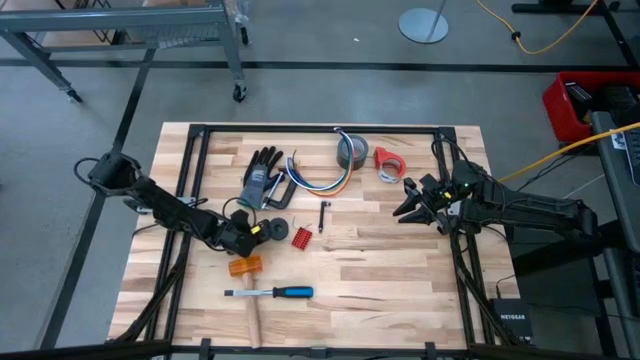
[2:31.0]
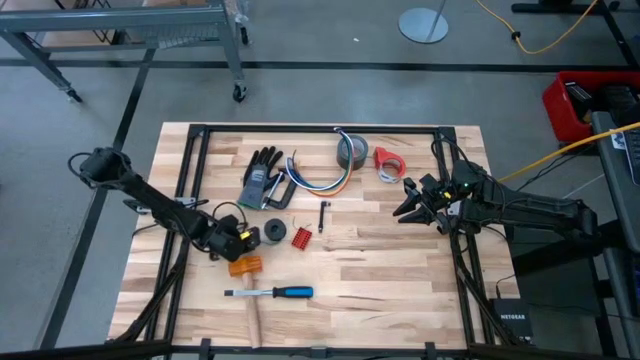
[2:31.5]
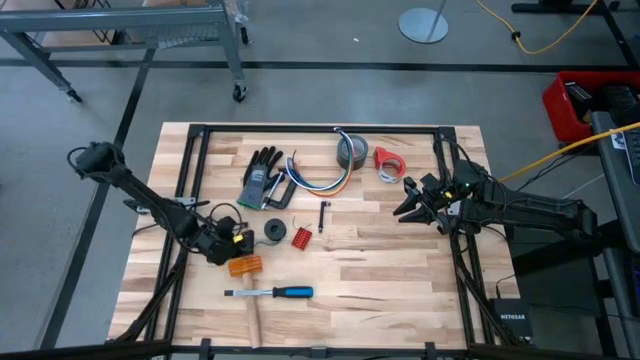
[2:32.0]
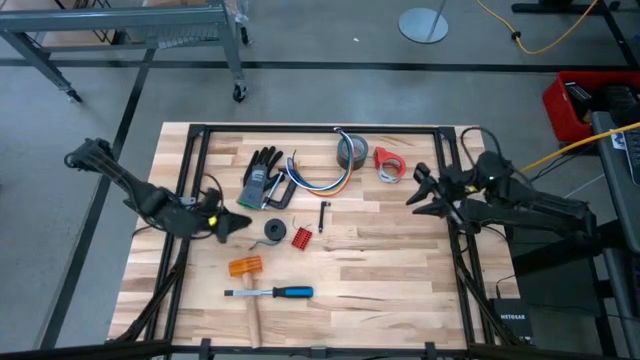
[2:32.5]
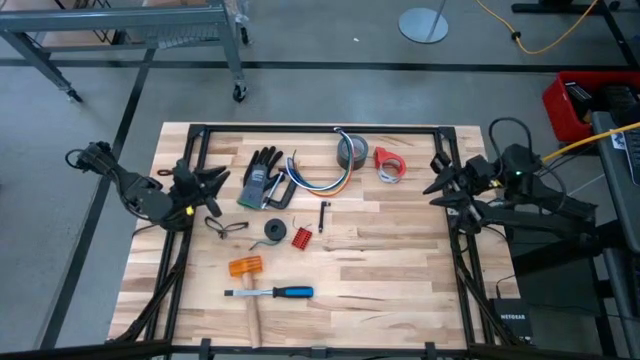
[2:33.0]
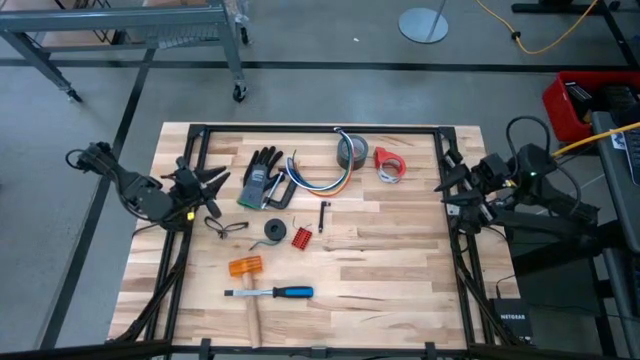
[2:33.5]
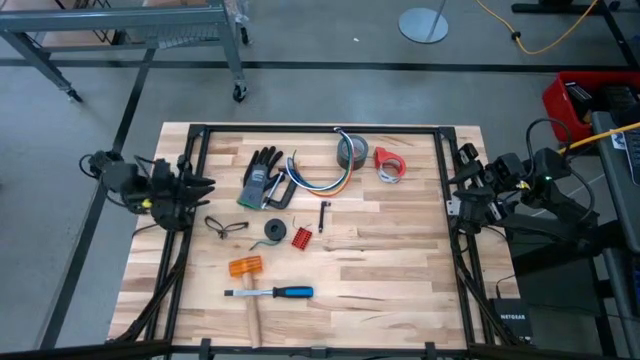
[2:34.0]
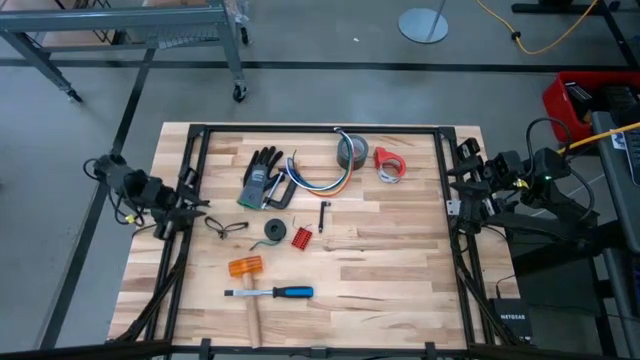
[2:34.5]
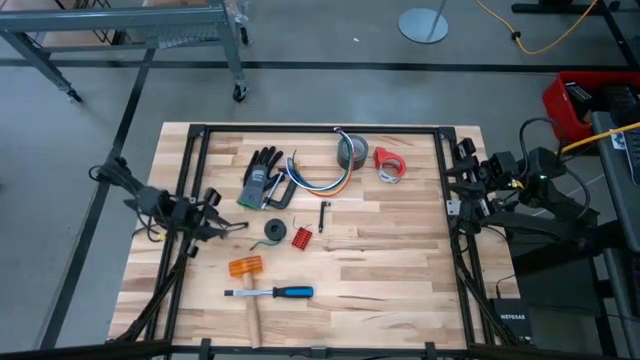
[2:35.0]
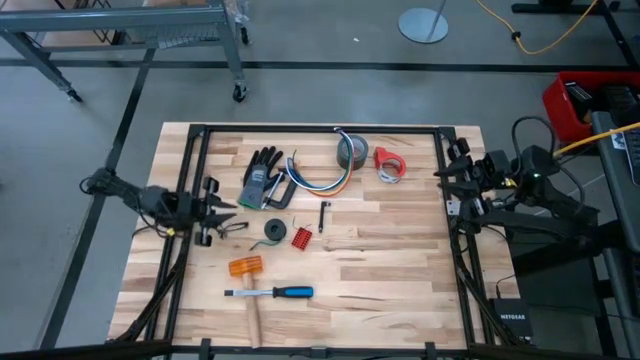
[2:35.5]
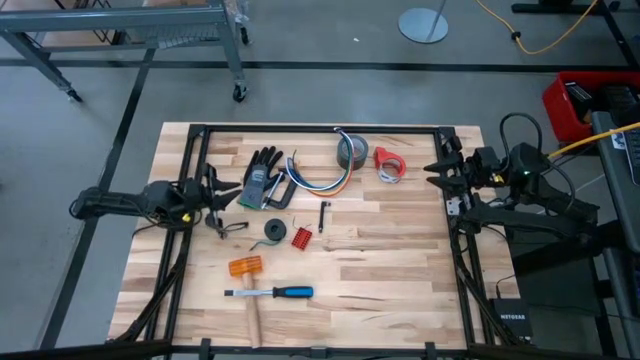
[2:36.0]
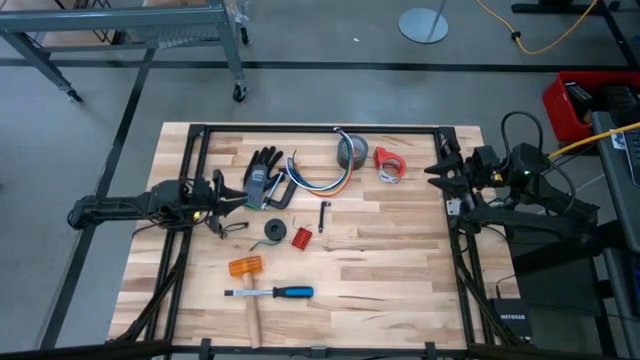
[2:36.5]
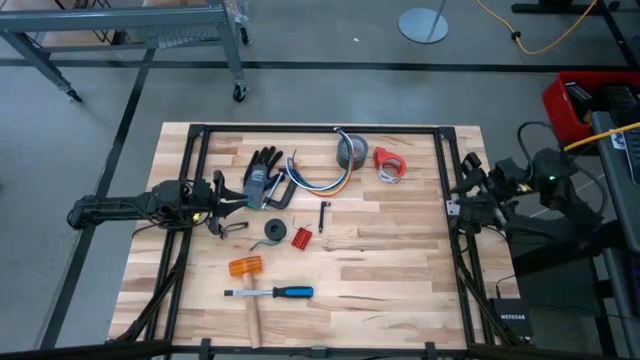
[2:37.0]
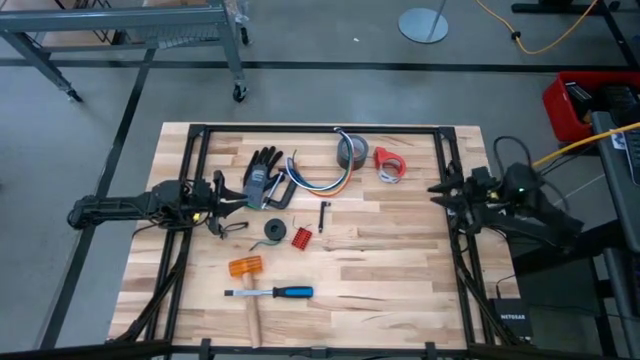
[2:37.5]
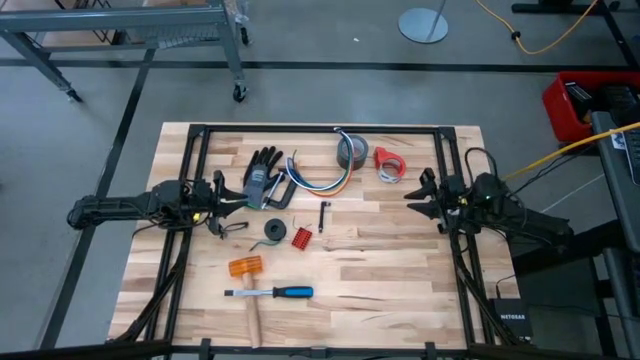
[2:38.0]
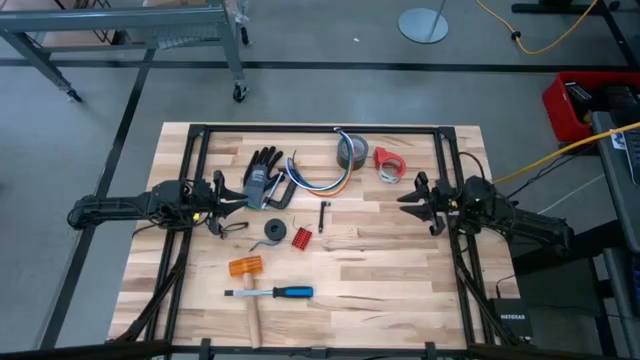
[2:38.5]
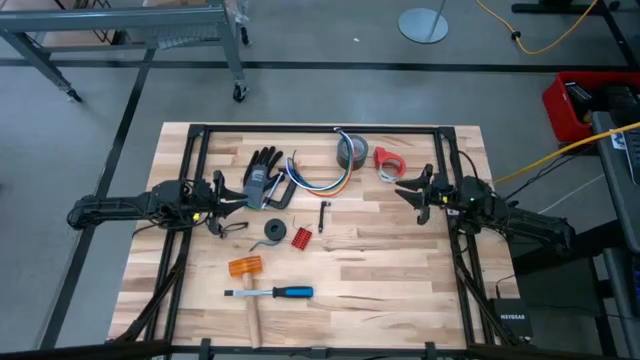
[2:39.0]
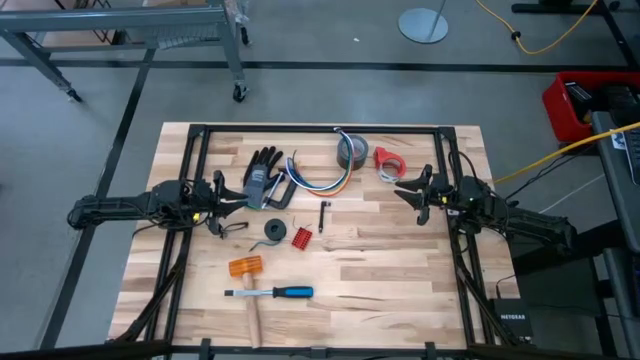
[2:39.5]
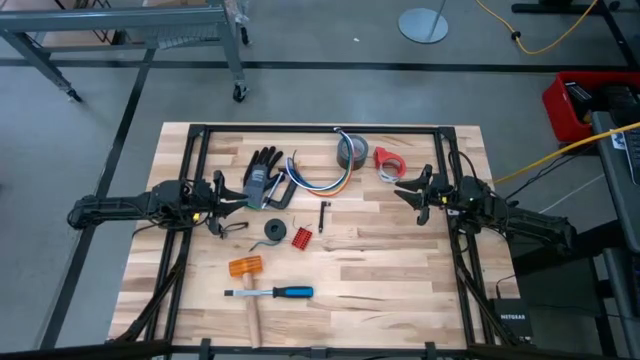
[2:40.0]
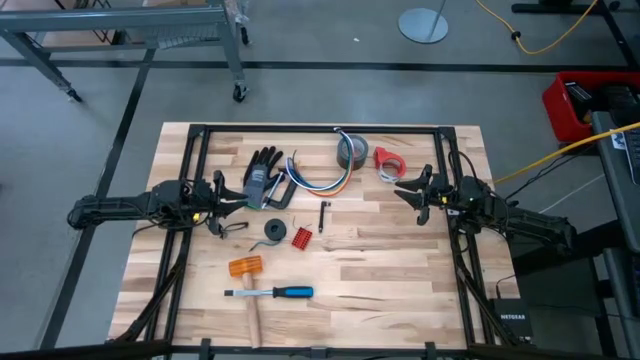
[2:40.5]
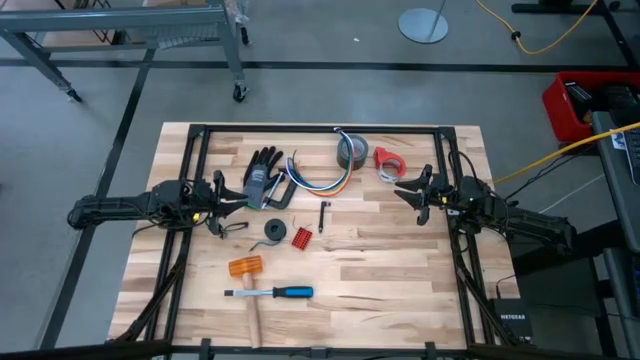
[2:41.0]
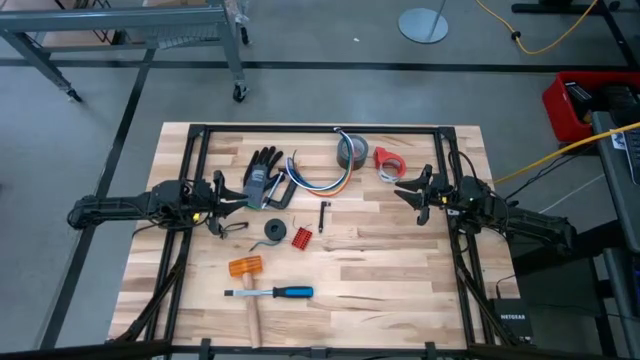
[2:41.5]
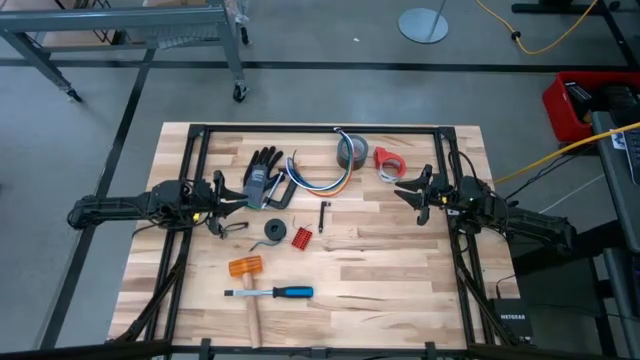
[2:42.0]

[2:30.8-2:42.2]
Task: Coil cords
Return to Home Position

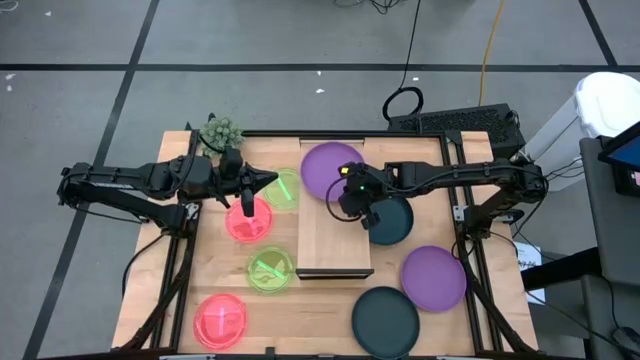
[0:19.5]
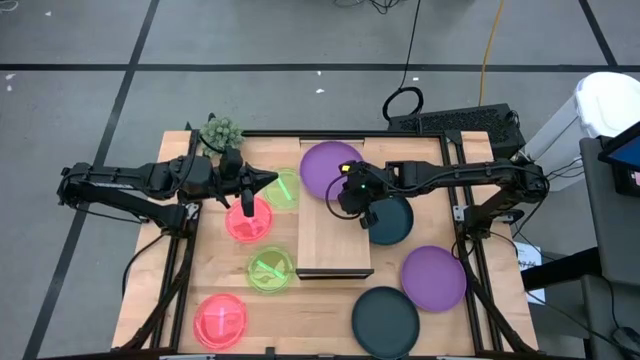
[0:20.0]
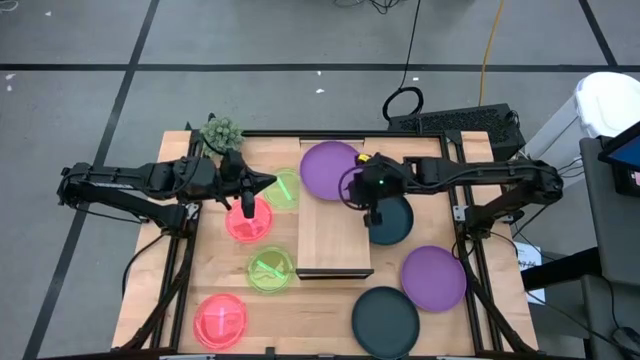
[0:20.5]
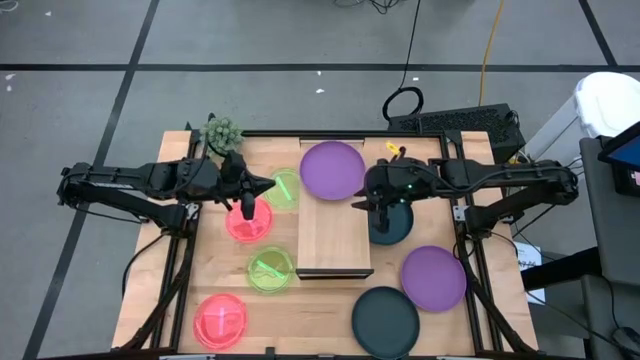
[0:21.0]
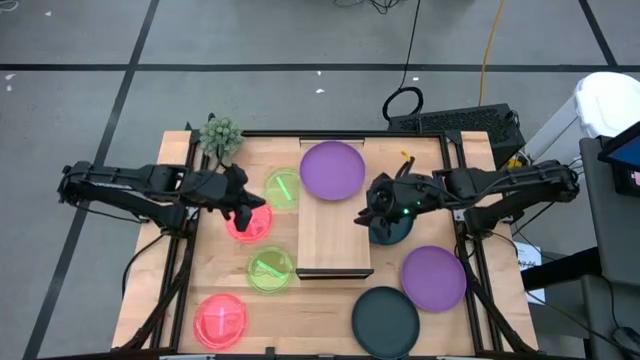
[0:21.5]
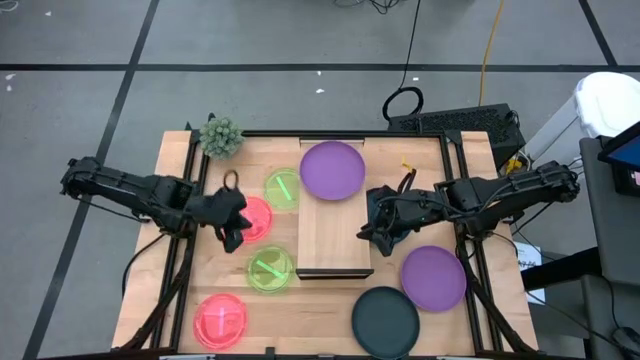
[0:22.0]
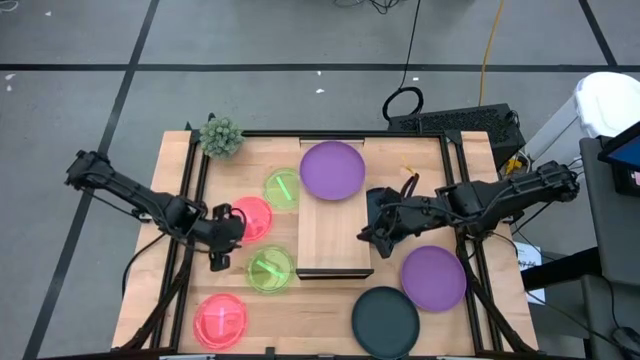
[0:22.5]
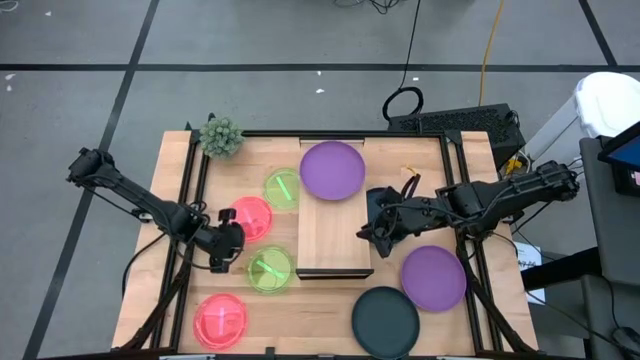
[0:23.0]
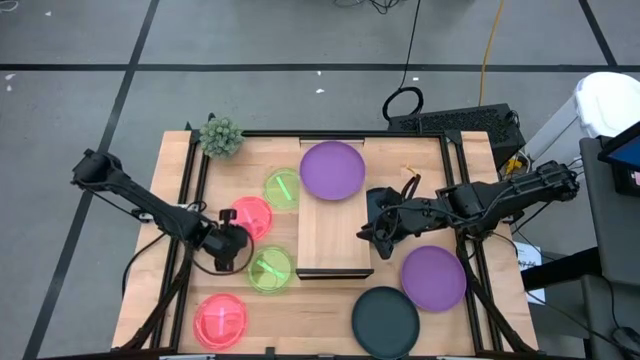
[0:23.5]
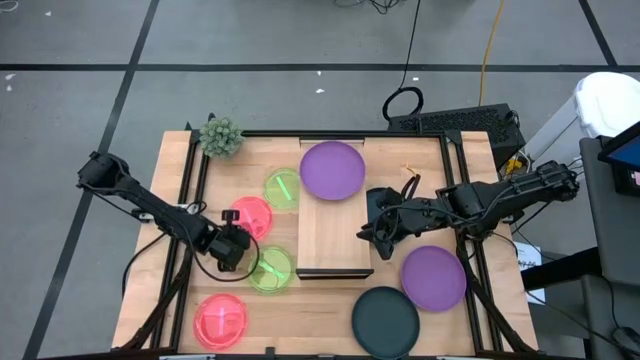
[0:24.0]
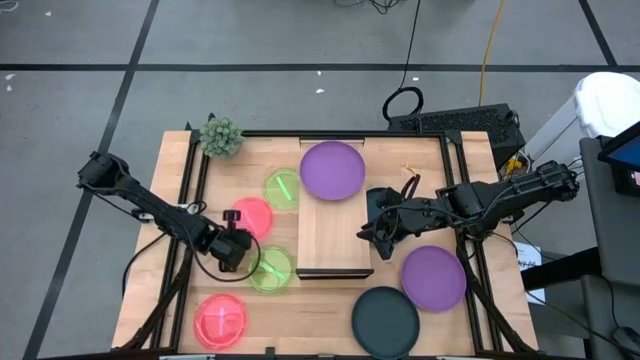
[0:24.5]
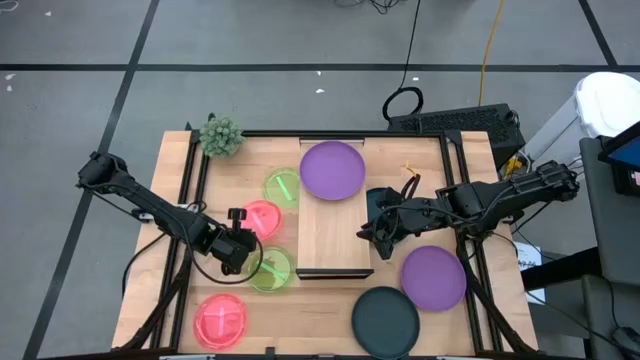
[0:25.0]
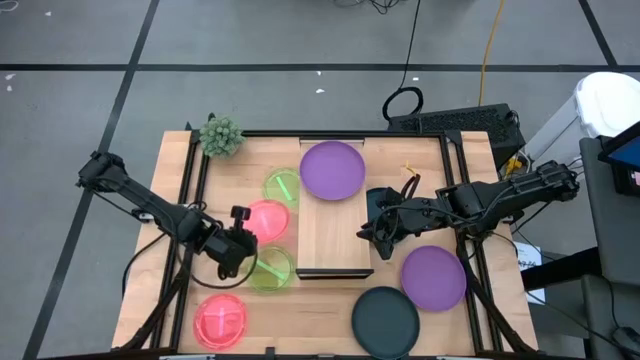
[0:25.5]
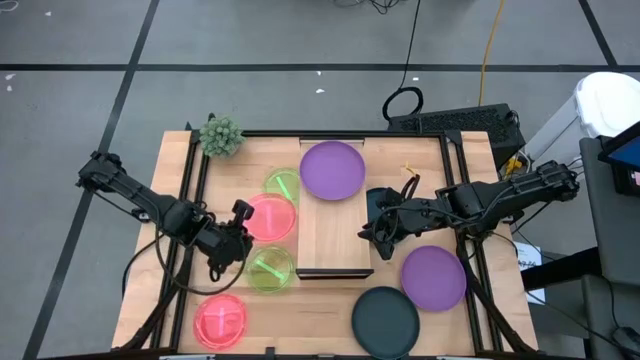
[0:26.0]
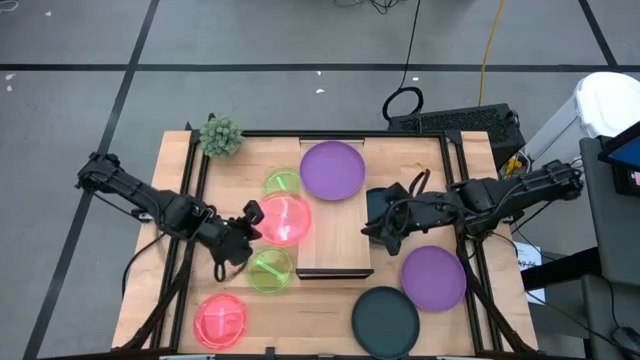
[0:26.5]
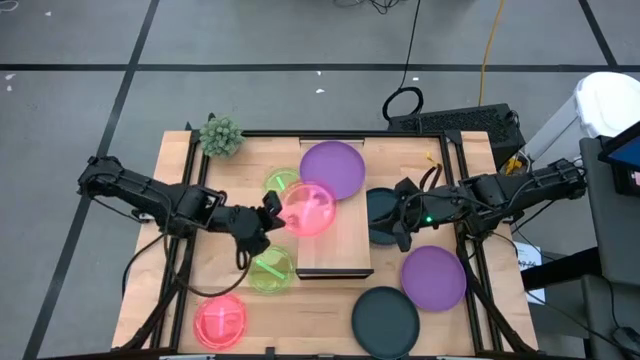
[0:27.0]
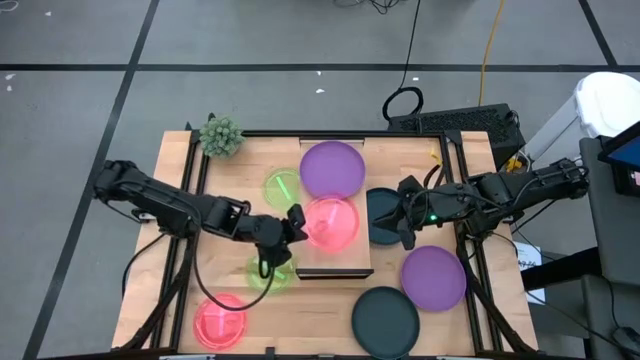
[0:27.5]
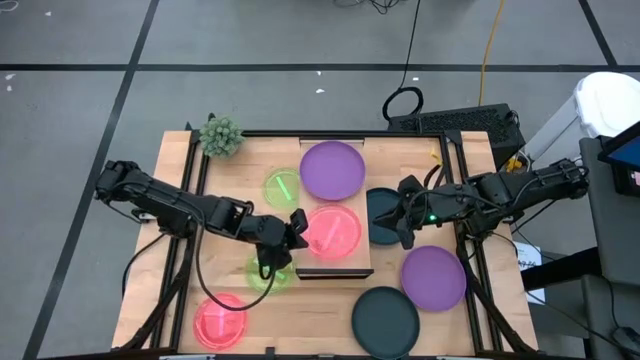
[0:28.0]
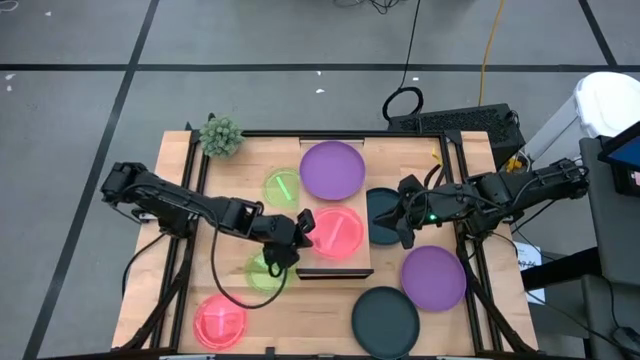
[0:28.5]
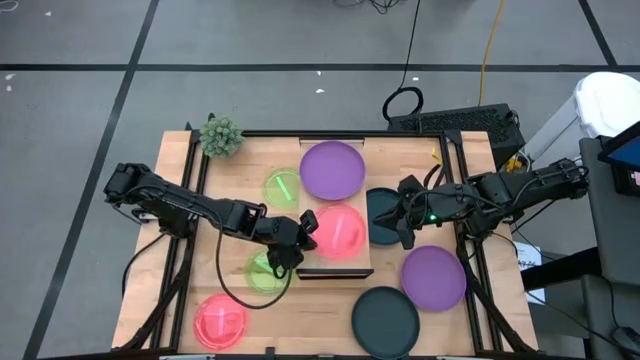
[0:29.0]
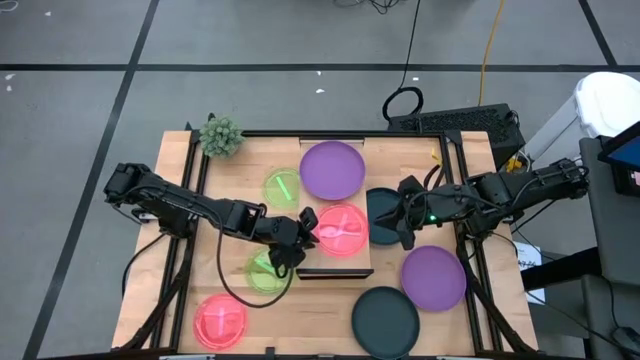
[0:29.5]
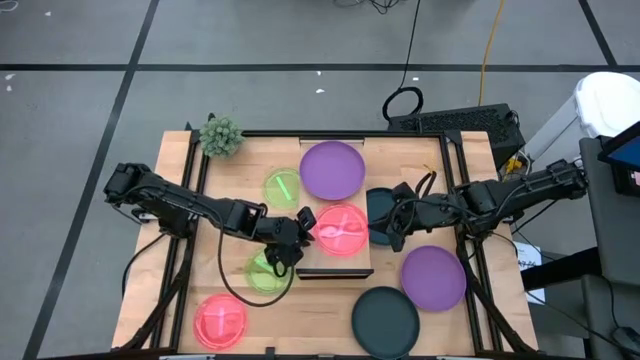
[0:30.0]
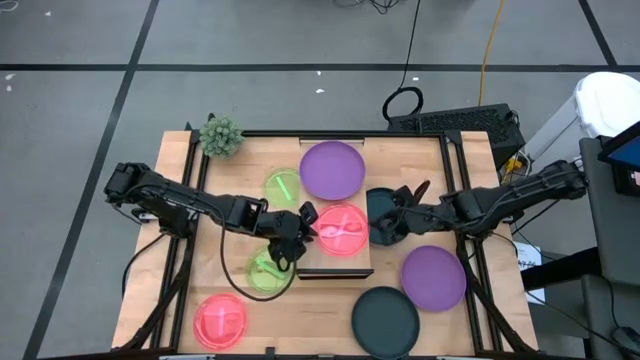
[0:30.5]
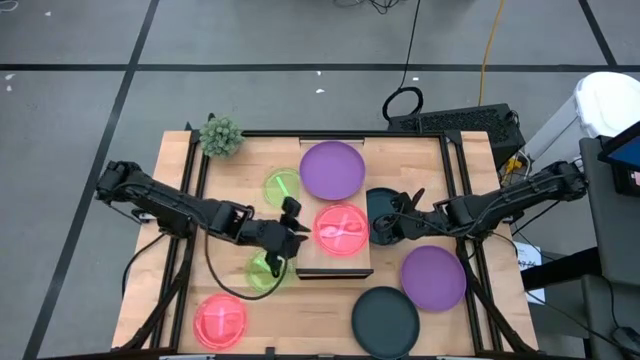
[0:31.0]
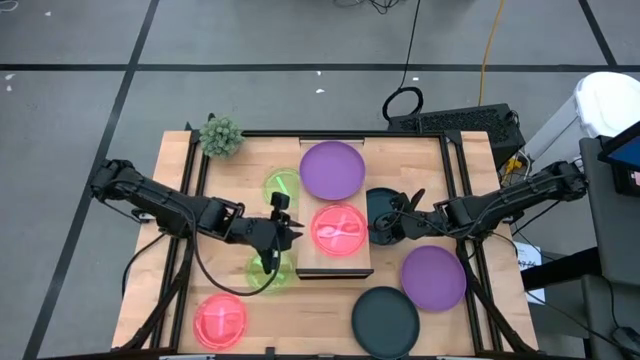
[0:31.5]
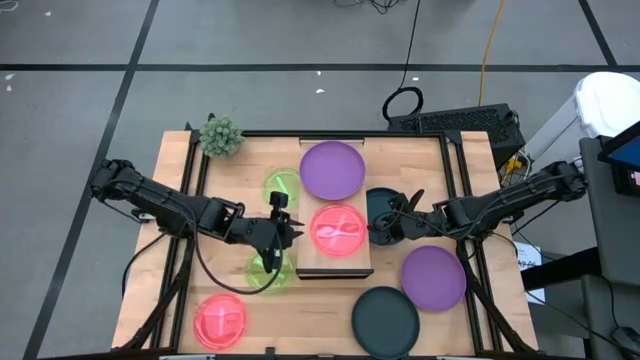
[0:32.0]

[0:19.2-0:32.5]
Task: Place and stack plates onto a shelf
Put the top pink plate on the shelf
